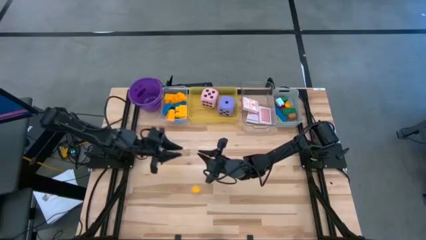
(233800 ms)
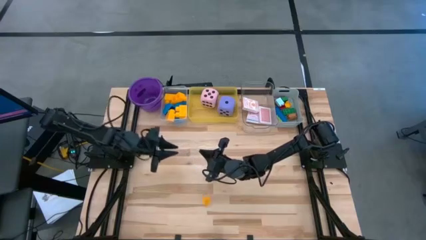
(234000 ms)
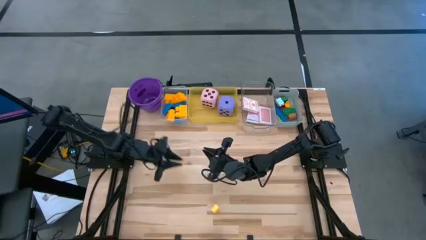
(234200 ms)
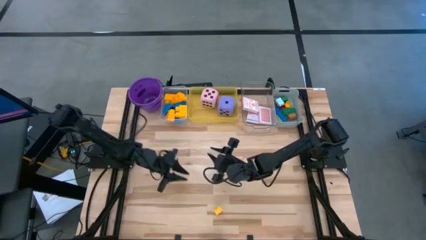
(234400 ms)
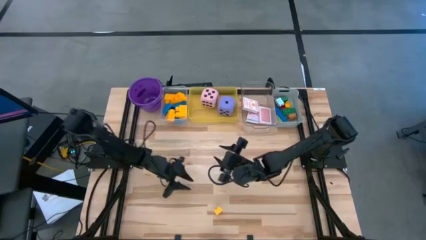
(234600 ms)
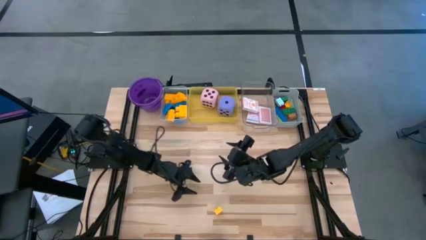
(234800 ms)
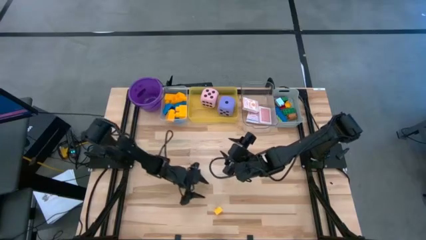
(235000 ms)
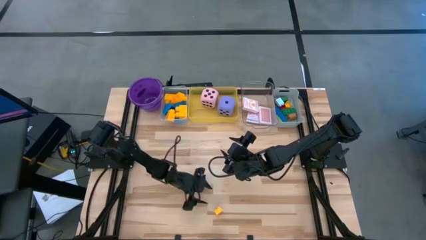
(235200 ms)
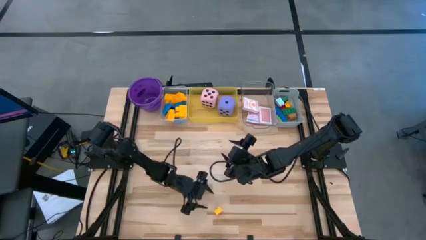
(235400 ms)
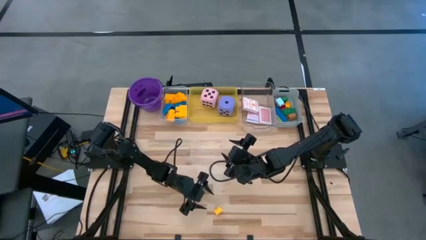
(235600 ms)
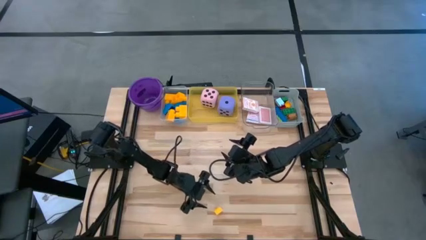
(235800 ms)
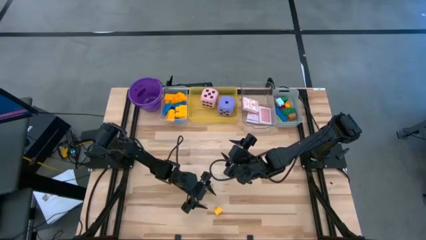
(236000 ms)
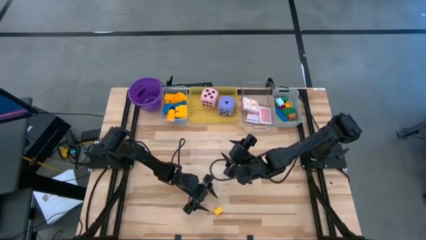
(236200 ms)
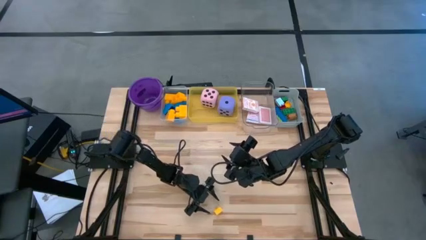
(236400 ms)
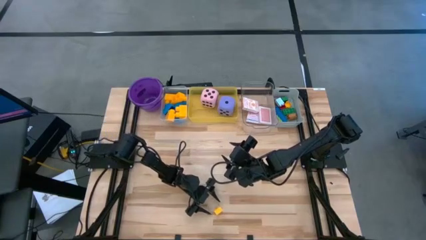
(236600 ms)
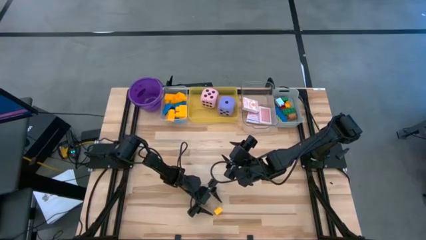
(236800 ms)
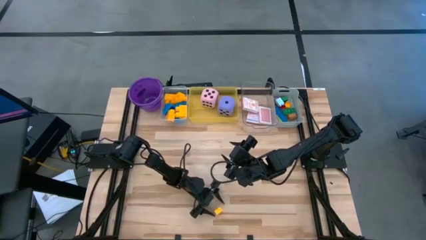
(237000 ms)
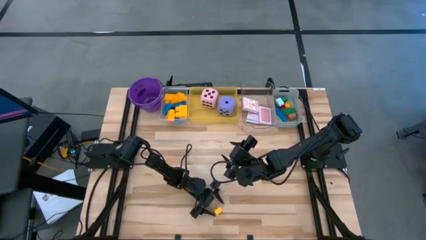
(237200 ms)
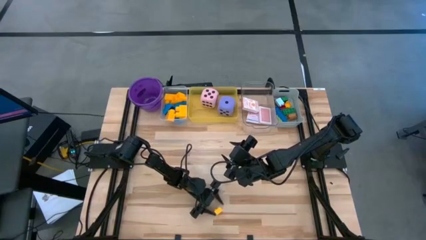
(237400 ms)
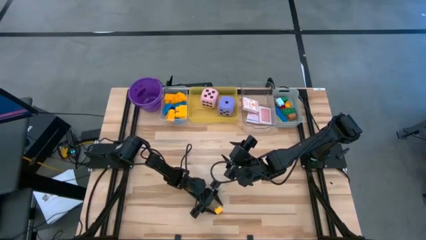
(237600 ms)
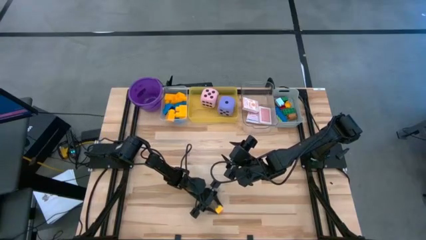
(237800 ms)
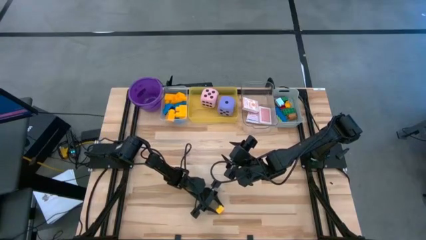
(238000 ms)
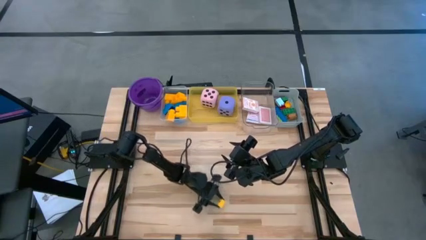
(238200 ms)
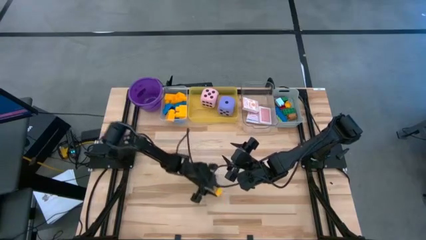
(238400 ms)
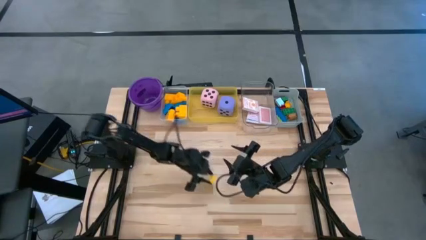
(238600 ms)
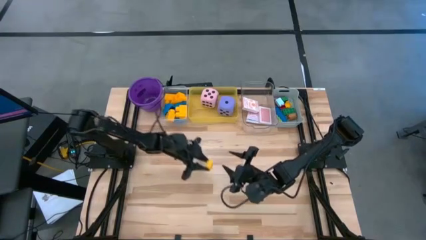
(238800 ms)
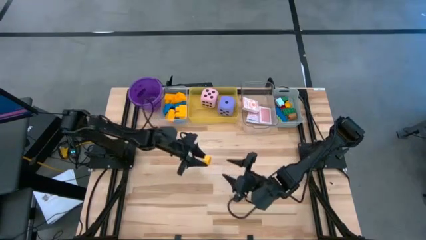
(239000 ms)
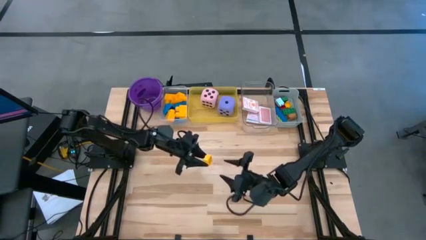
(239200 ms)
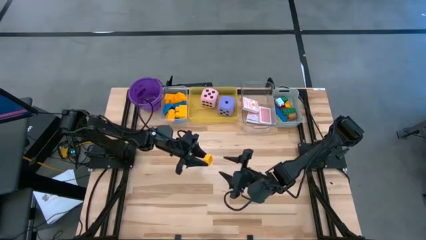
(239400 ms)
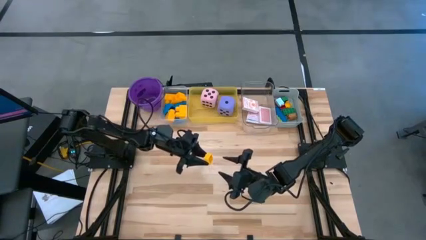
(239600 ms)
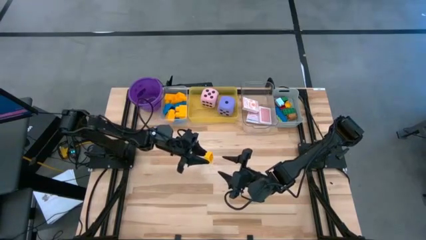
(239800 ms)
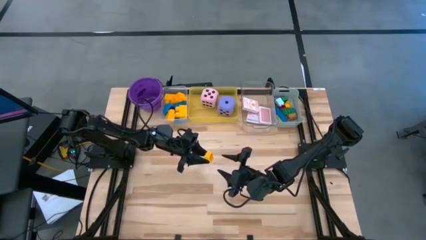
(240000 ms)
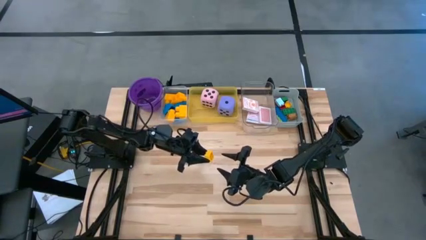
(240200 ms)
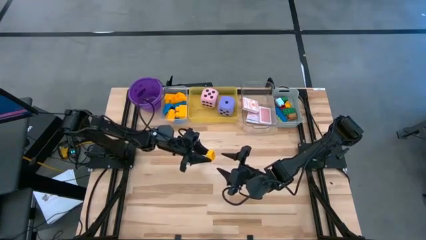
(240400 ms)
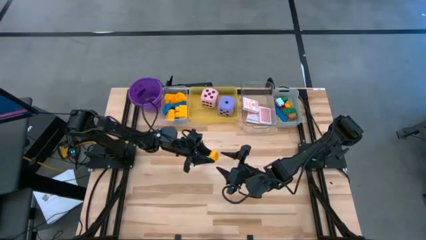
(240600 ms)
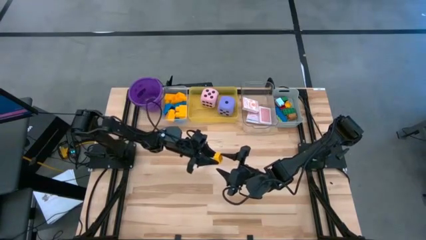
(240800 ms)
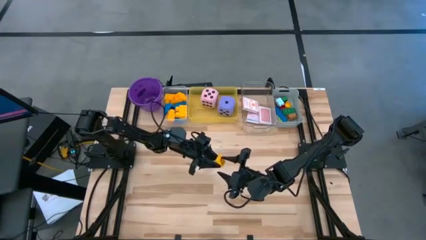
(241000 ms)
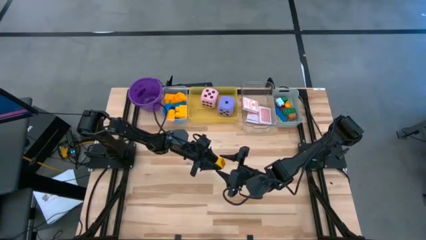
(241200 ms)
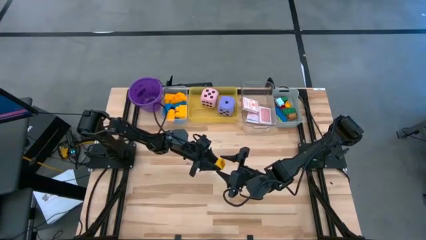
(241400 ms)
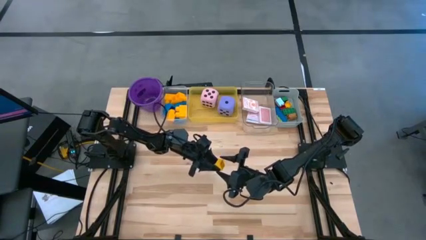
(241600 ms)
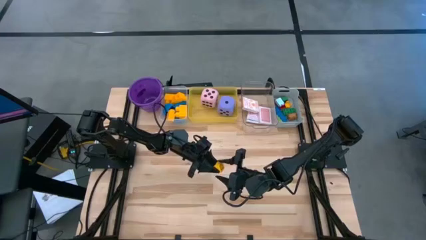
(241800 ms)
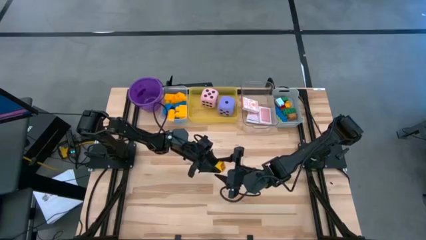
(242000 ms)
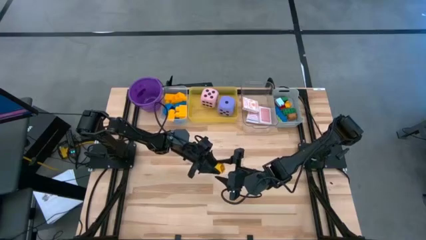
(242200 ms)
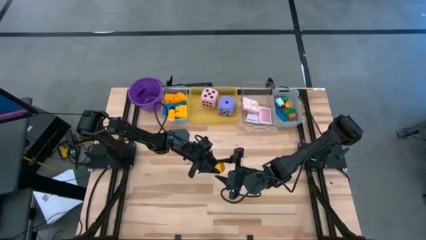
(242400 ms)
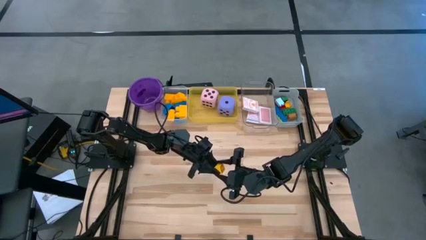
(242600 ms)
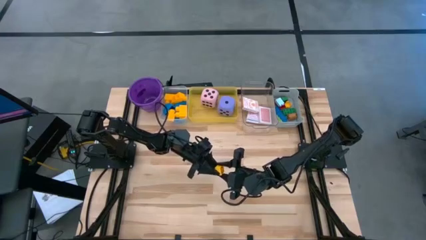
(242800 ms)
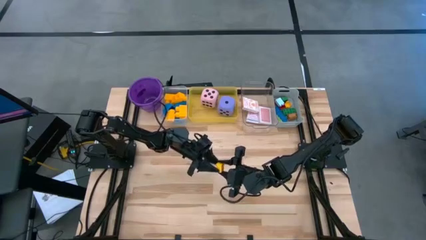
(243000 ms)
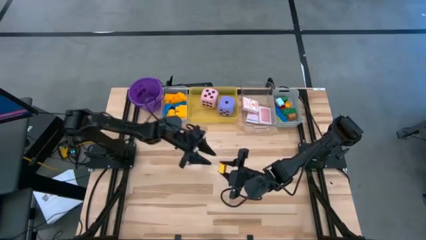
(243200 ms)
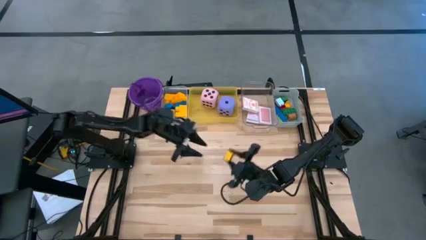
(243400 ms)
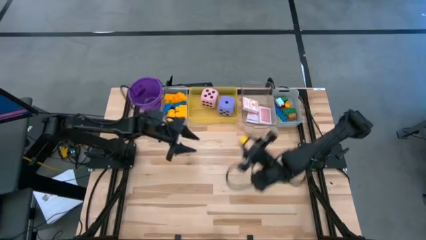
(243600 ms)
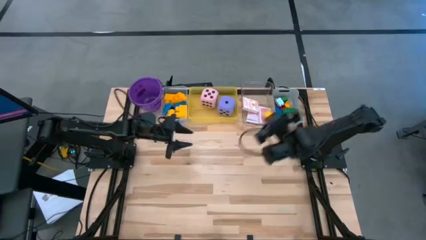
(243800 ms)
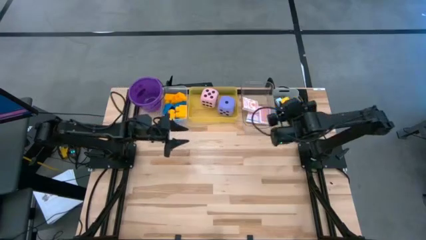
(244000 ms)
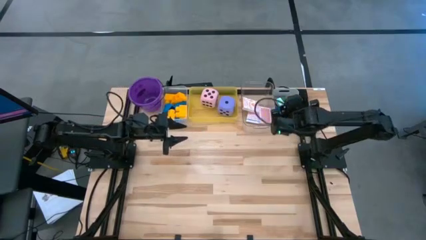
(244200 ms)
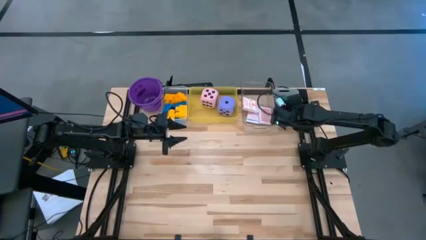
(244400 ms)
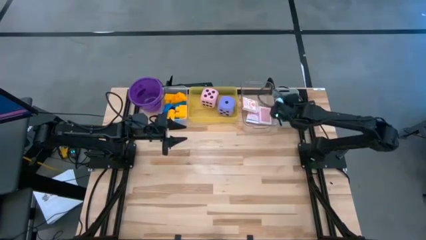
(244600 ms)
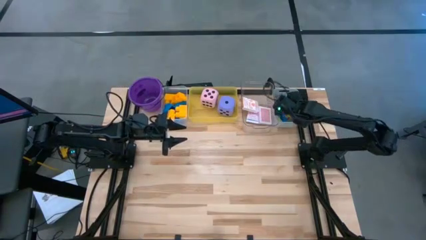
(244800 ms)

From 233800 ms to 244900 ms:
Task: Pick & Place Toys
Put the small yellow game piece into the gray bin

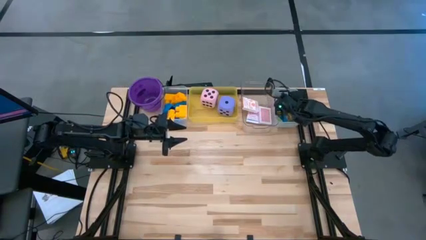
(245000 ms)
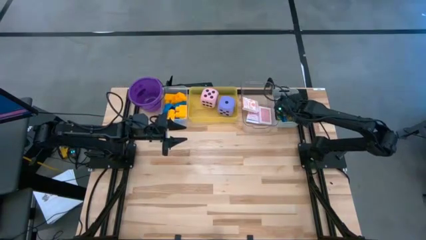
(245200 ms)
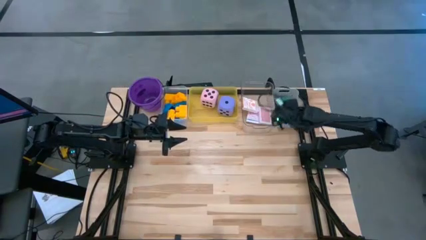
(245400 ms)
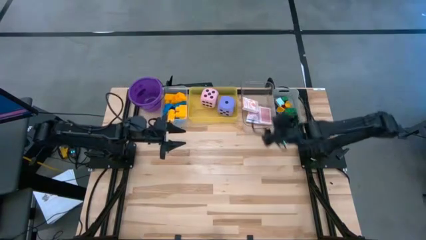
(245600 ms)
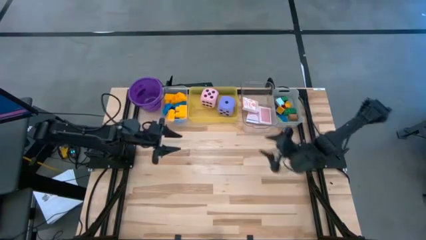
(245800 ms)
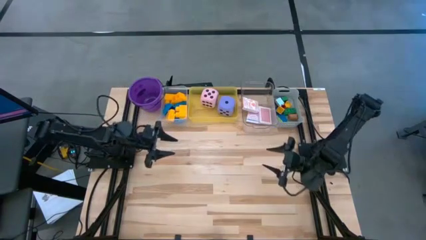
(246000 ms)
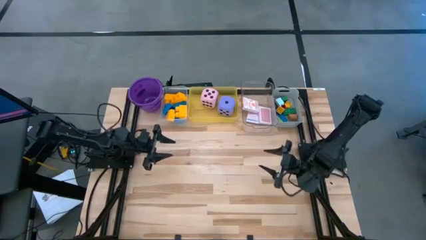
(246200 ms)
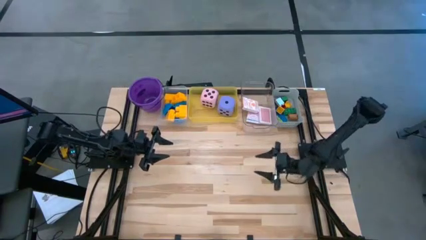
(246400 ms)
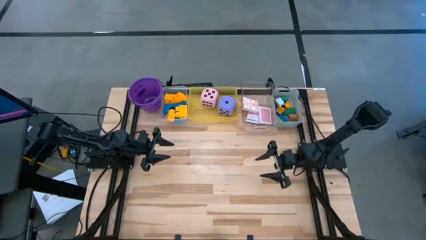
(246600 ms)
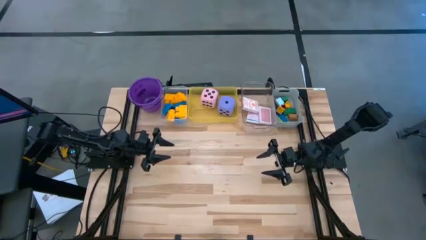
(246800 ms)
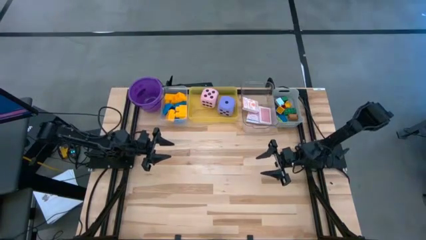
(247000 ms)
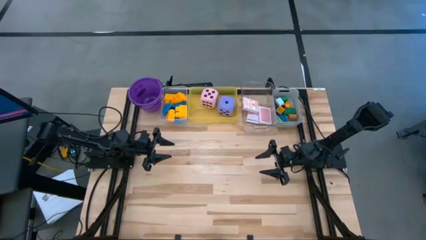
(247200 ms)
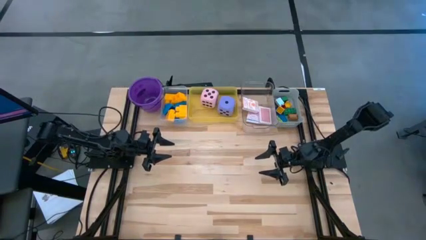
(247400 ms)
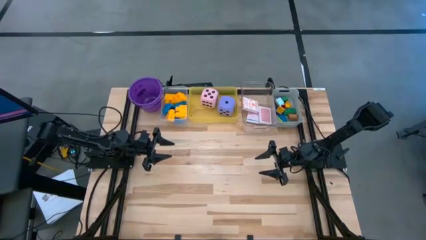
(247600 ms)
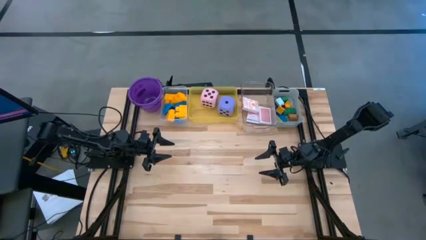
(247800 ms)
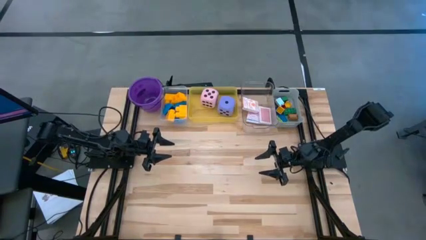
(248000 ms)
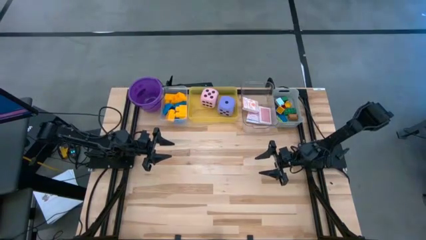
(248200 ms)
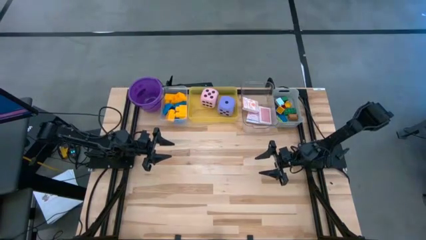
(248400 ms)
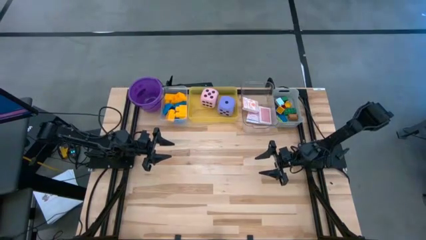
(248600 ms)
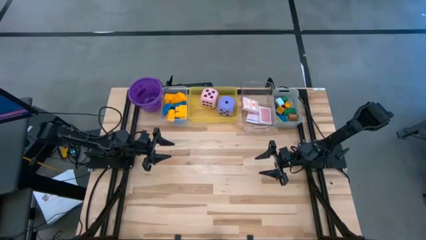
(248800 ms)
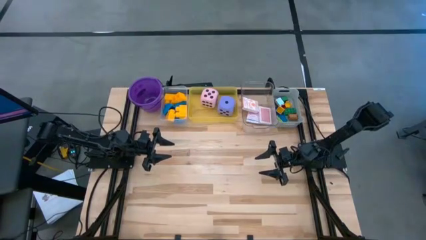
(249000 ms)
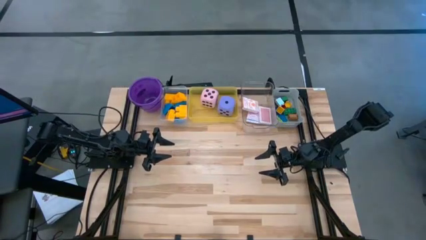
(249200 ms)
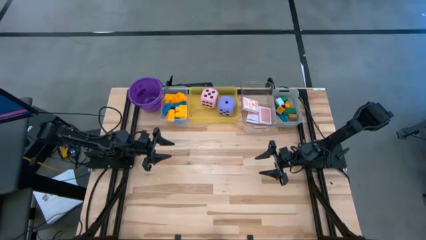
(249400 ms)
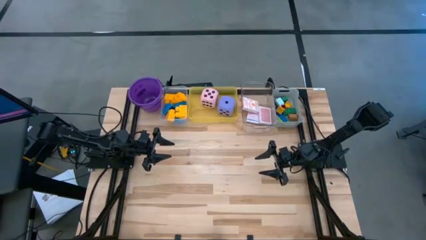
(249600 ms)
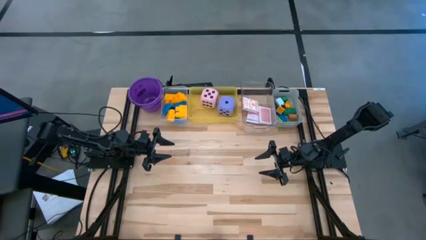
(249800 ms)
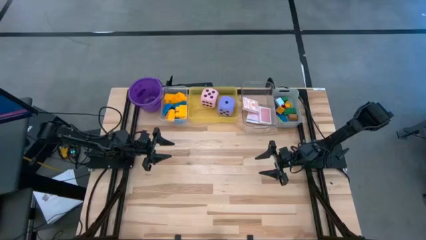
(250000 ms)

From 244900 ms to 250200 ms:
Return to Home Position
